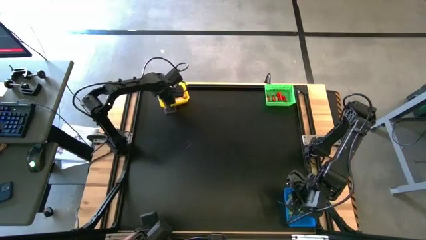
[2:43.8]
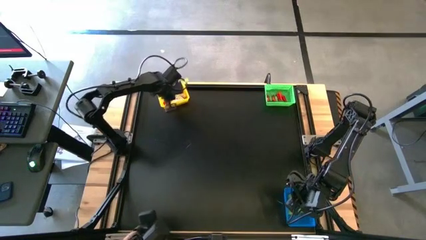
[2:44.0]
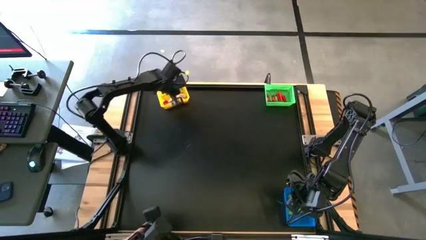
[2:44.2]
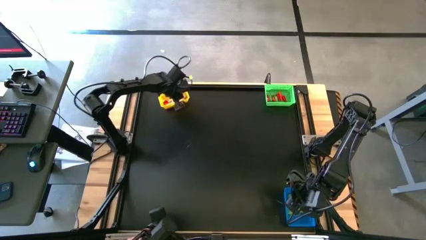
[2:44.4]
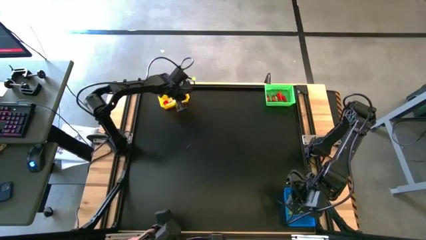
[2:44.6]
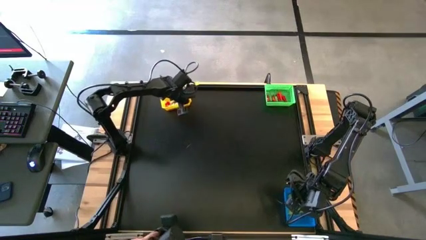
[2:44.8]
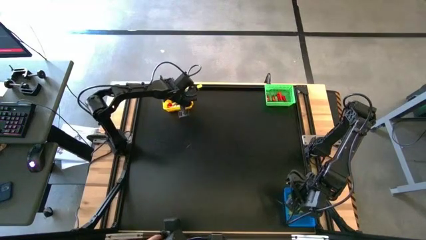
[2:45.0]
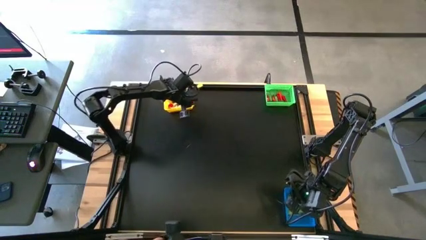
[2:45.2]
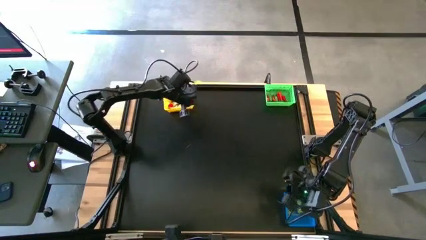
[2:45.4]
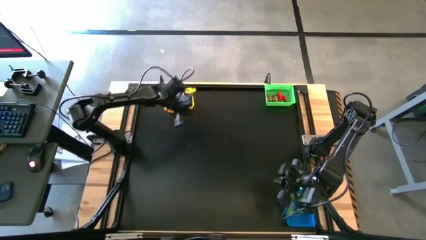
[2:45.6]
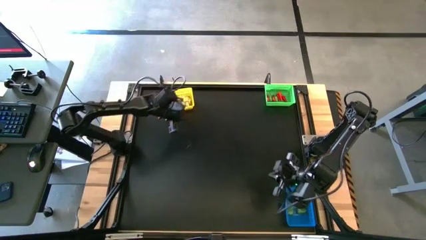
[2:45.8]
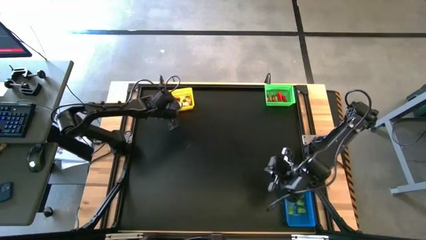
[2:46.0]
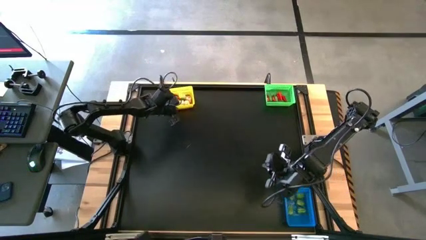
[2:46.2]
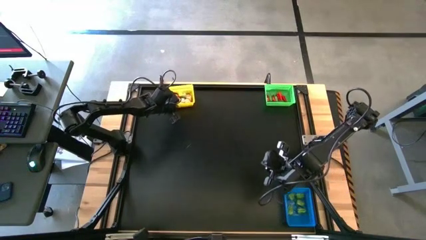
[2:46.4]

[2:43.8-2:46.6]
Task: Sort produce into baskets
Adjust the yellow bin on the table

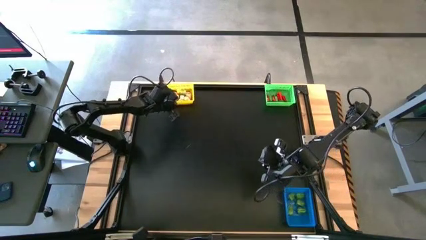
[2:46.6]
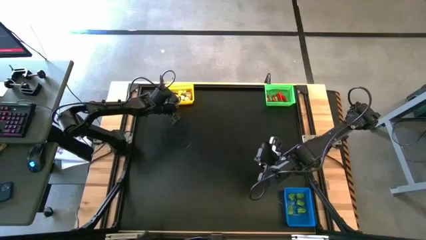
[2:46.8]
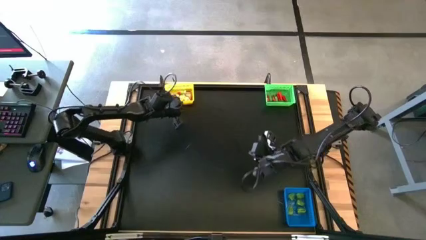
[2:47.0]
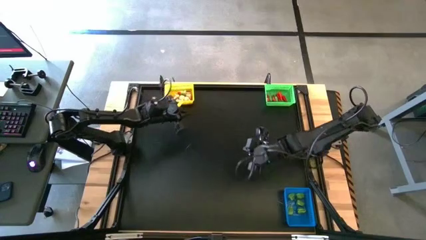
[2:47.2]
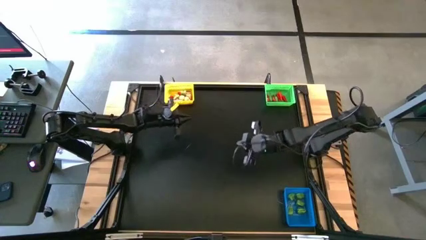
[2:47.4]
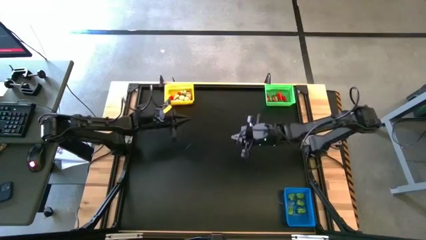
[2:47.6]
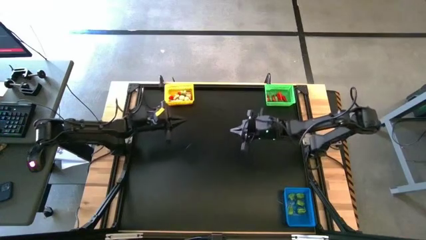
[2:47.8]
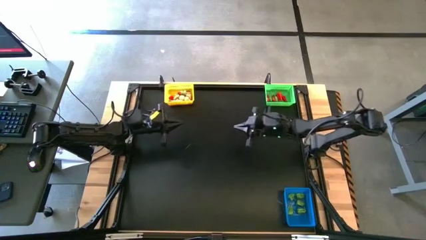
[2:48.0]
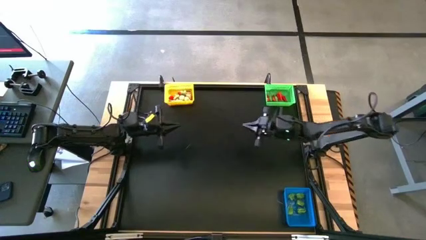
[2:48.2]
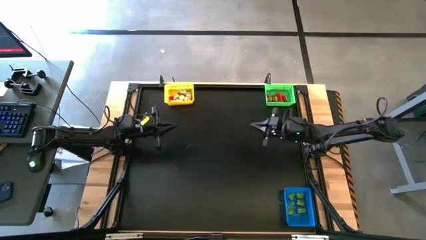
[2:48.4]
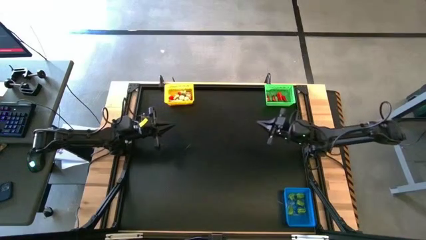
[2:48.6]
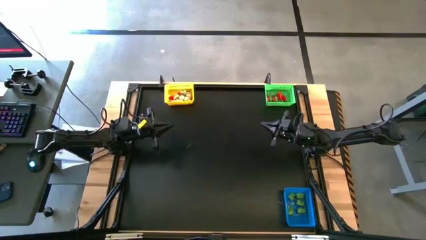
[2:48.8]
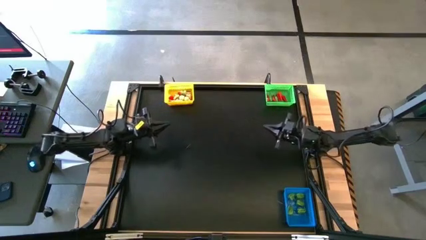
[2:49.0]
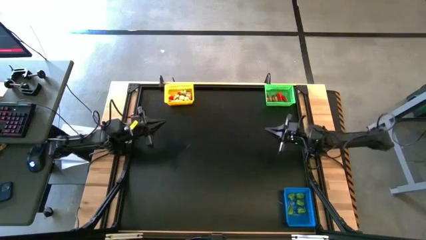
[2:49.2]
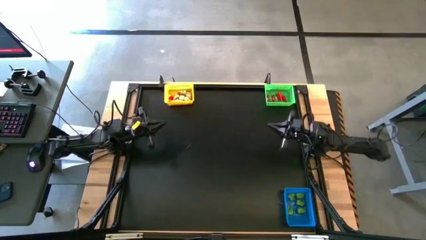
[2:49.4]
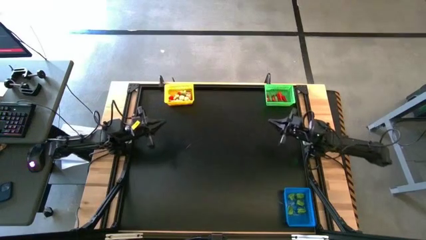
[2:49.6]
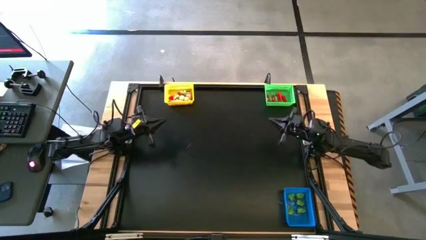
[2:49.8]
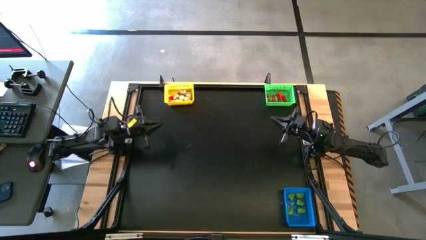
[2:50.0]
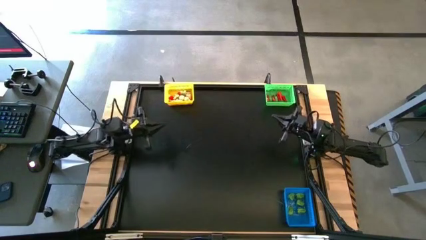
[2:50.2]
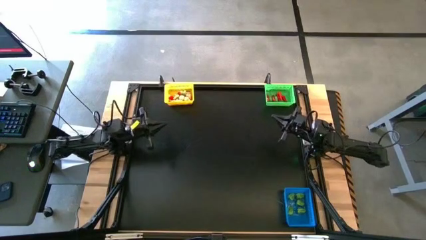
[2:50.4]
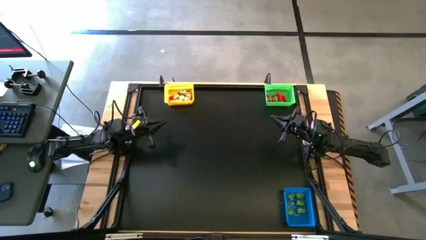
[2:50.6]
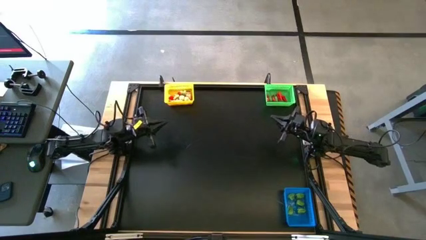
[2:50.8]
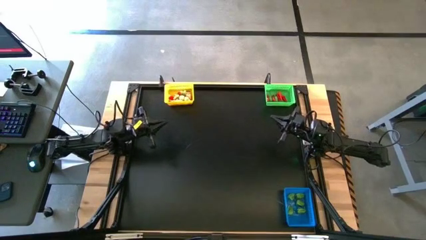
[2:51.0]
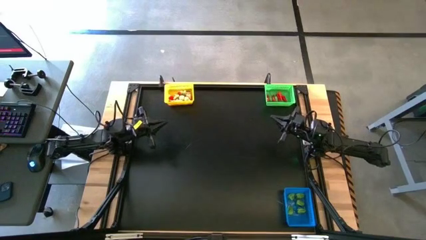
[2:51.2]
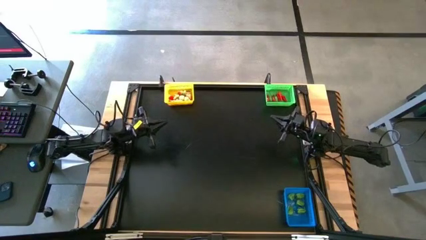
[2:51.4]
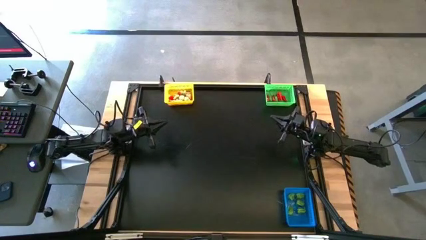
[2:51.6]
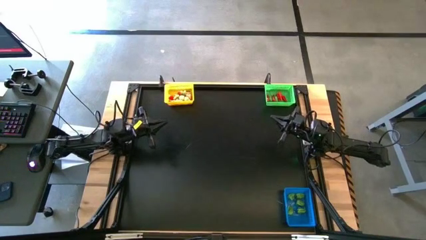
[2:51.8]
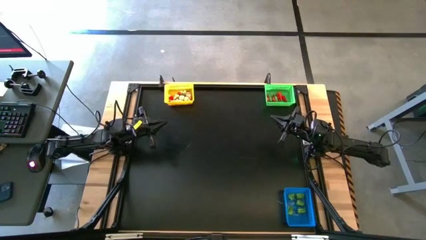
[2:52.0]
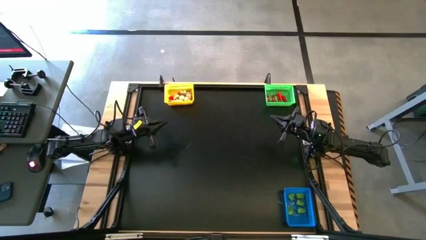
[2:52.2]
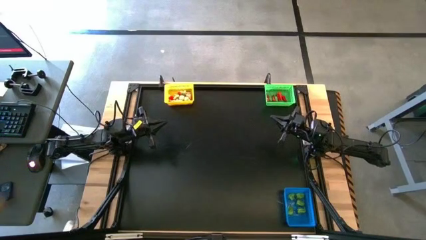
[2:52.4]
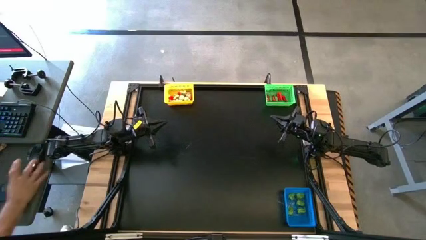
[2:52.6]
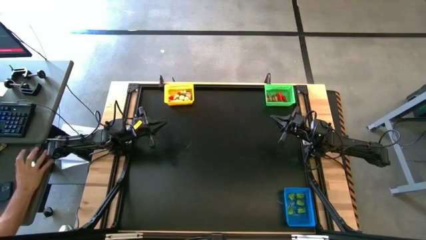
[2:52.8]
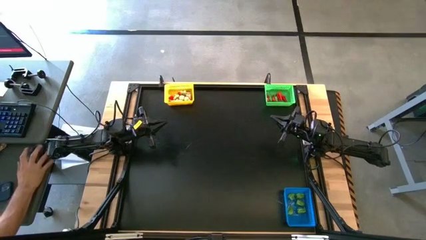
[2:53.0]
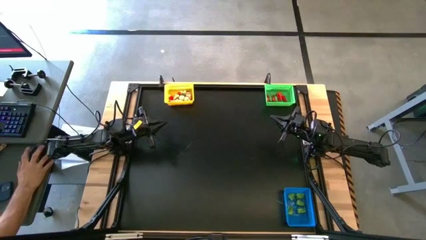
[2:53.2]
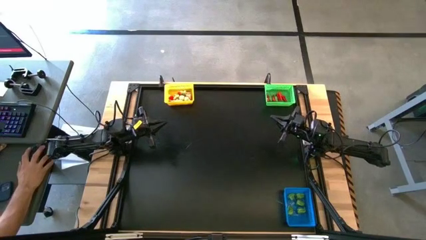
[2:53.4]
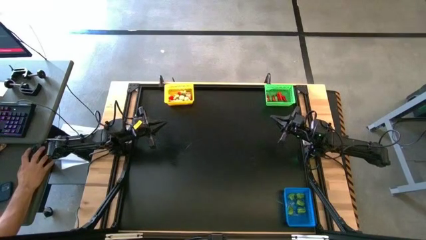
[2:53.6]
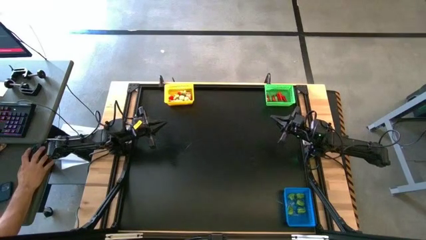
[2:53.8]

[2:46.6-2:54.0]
Return to Home Position

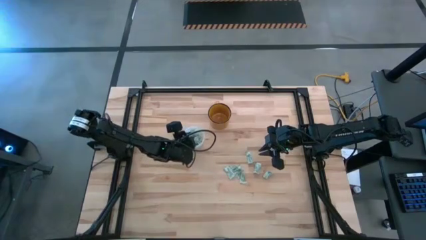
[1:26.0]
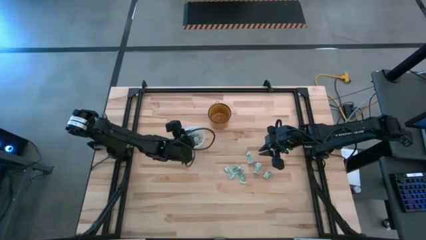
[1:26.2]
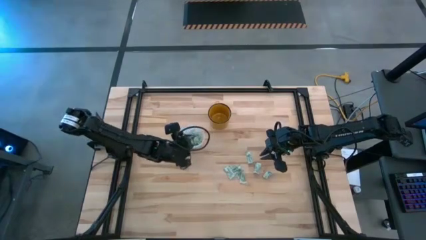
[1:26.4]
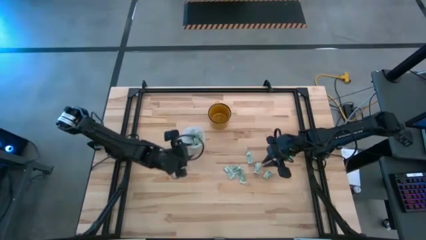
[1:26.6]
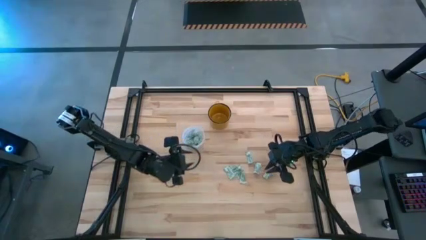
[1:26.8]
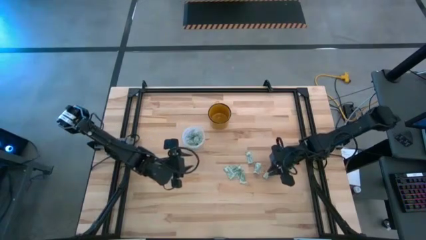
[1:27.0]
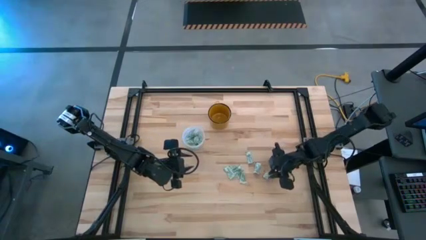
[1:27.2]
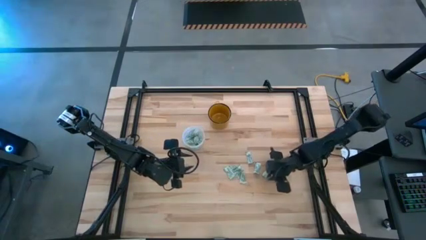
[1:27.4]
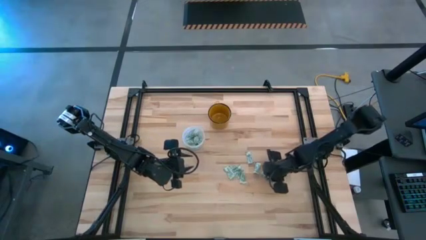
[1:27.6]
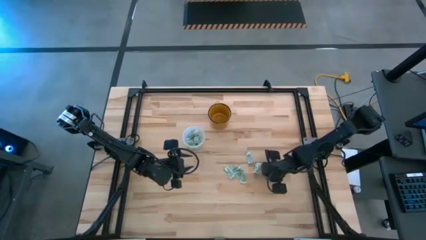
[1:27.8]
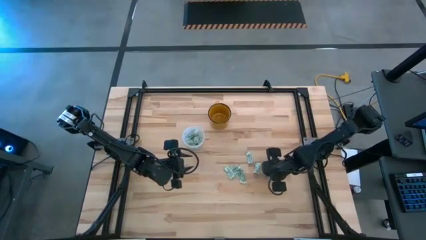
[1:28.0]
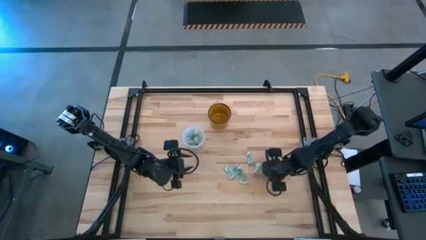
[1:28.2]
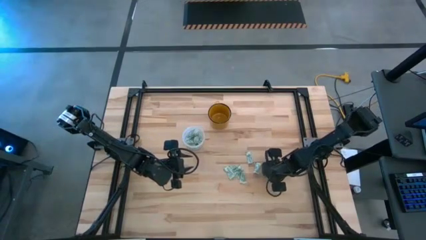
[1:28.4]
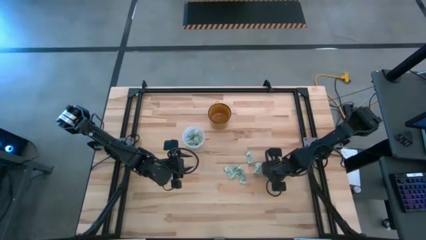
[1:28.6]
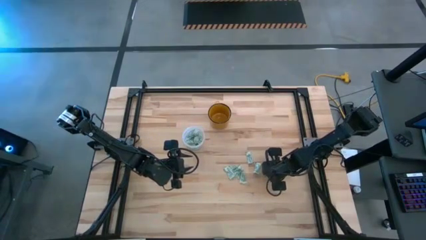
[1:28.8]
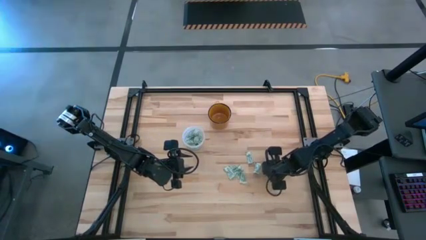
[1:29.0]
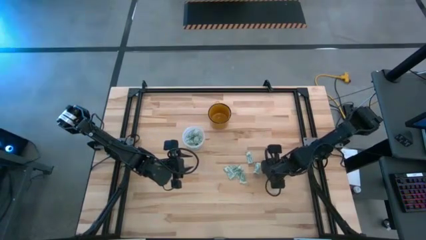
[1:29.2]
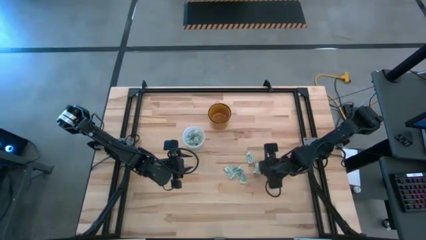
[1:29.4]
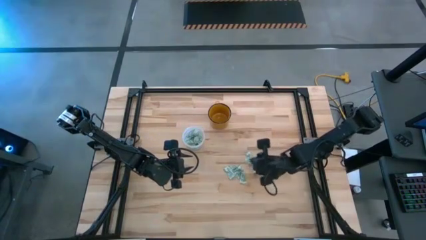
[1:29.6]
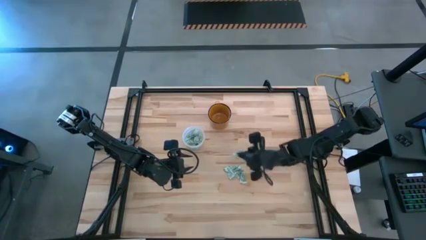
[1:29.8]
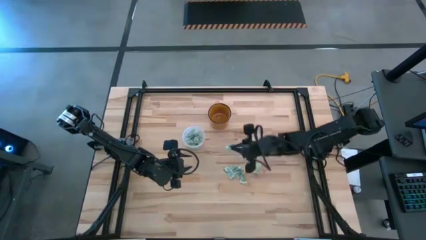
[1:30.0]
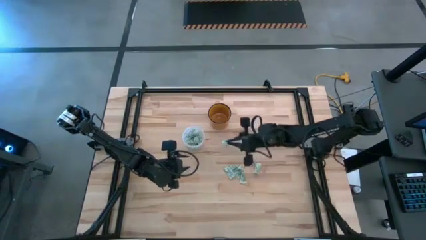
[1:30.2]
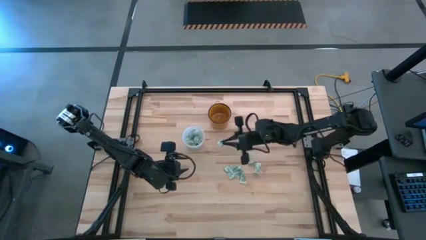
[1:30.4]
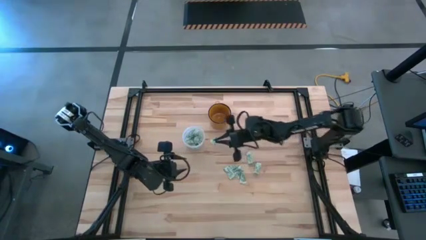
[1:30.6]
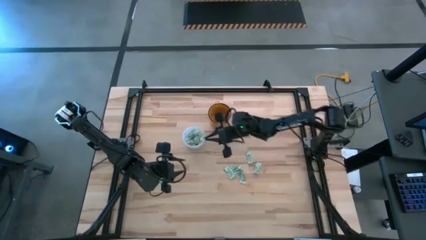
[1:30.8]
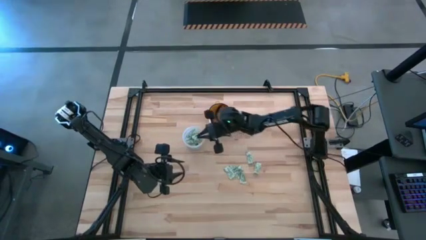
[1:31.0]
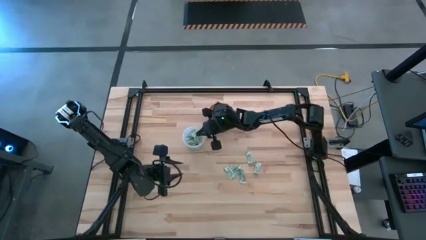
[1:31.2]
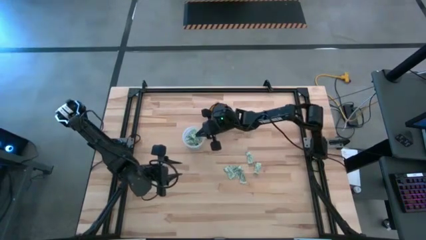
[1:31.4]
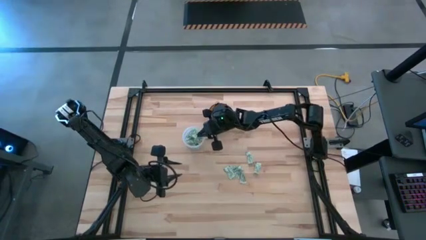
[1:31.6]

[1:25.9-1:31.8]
Task: Pick and place Stevia / Truvia into bins
Put the stevia packet into the transparent bin
